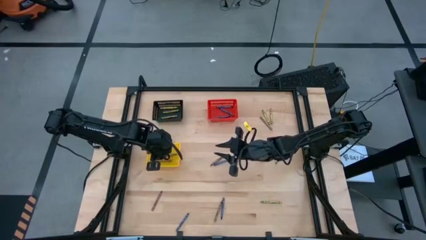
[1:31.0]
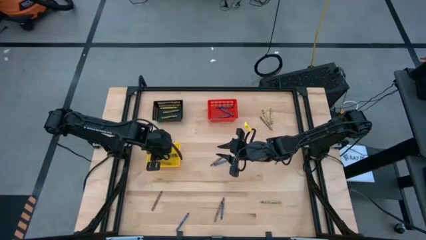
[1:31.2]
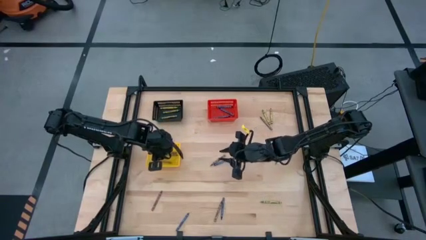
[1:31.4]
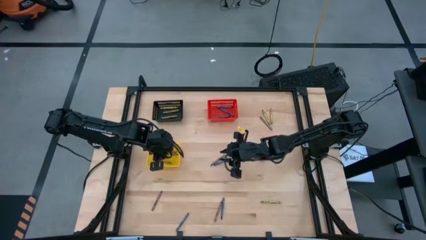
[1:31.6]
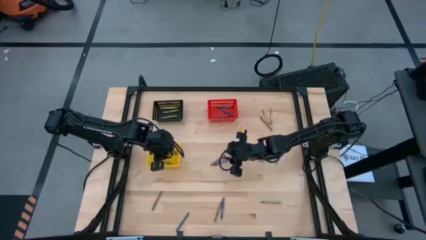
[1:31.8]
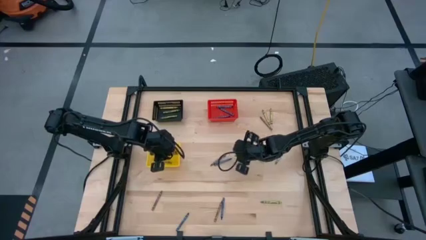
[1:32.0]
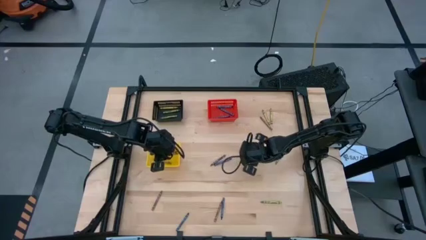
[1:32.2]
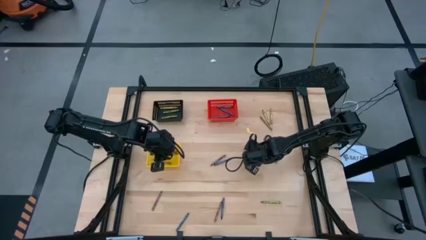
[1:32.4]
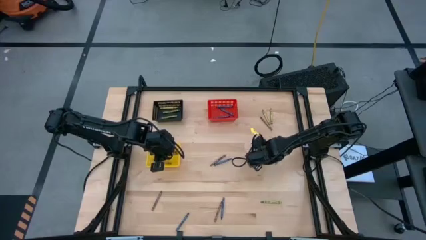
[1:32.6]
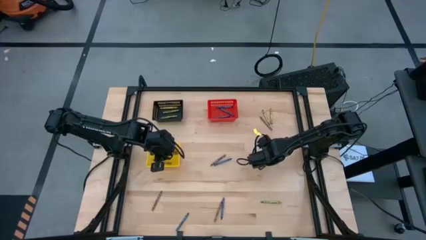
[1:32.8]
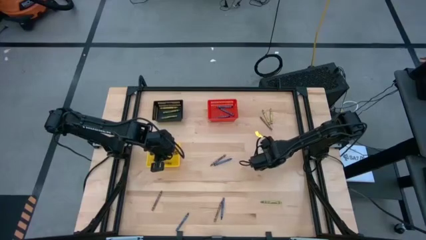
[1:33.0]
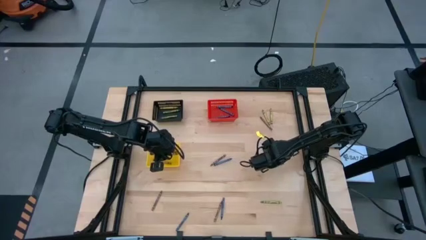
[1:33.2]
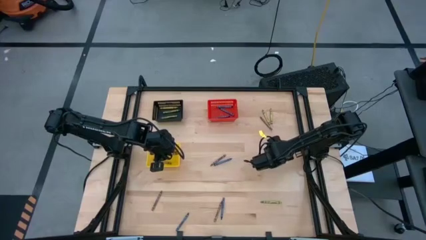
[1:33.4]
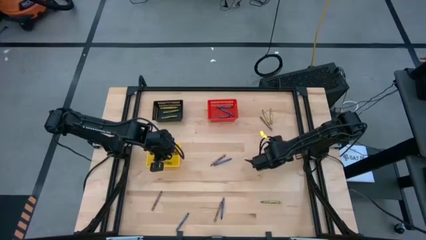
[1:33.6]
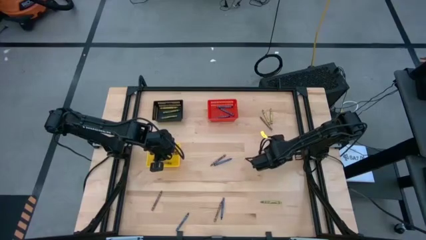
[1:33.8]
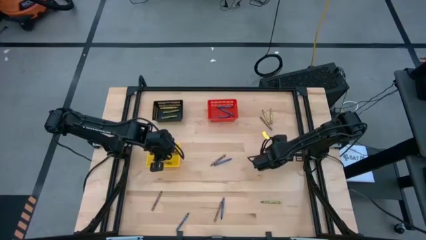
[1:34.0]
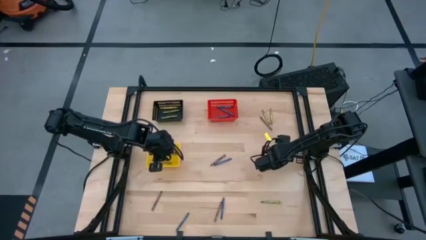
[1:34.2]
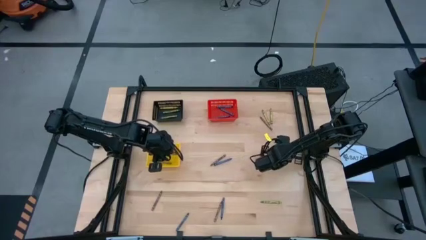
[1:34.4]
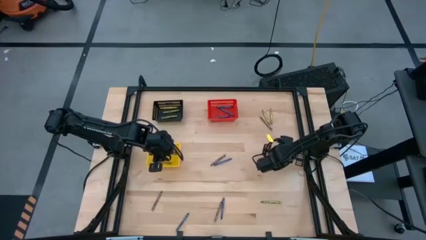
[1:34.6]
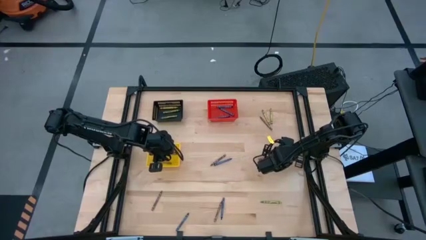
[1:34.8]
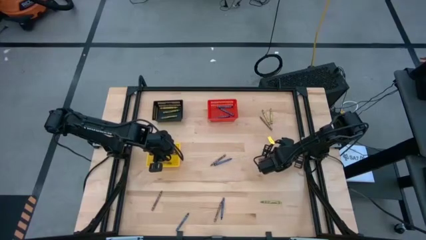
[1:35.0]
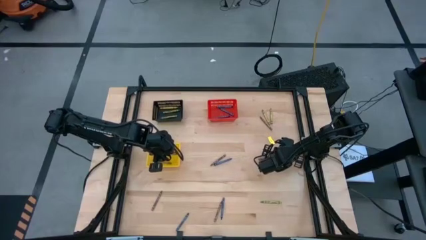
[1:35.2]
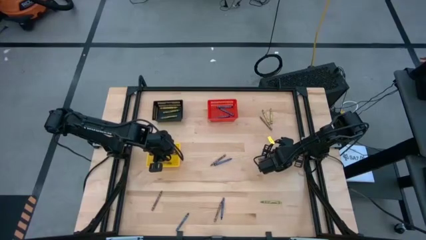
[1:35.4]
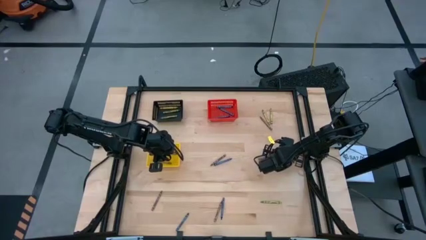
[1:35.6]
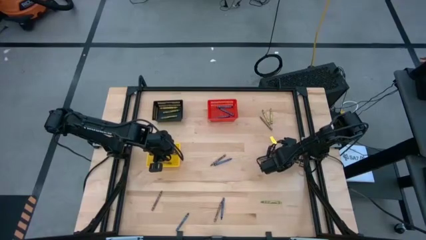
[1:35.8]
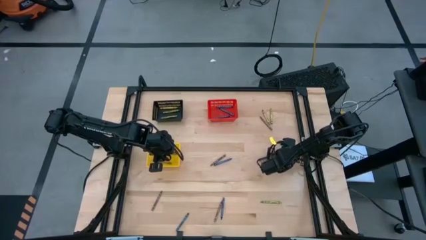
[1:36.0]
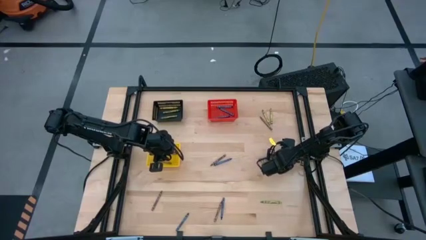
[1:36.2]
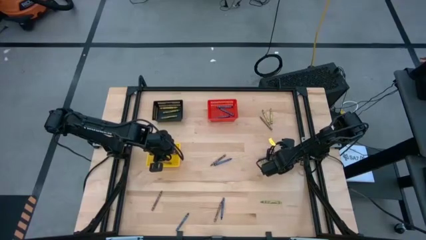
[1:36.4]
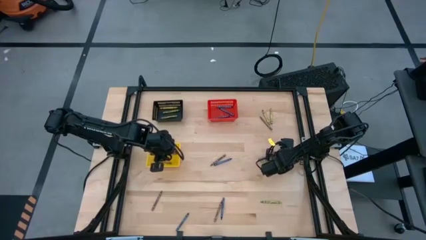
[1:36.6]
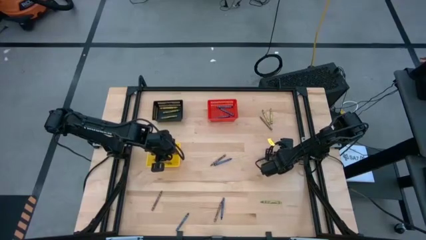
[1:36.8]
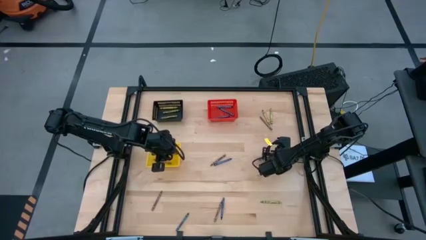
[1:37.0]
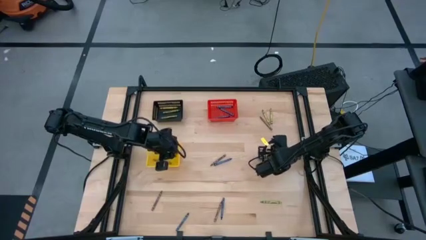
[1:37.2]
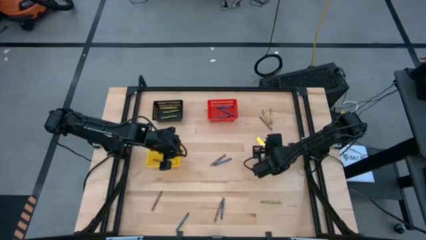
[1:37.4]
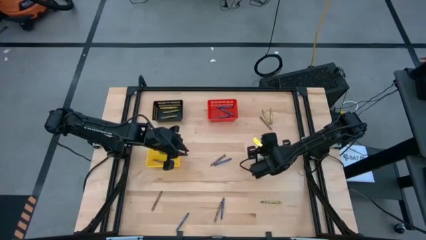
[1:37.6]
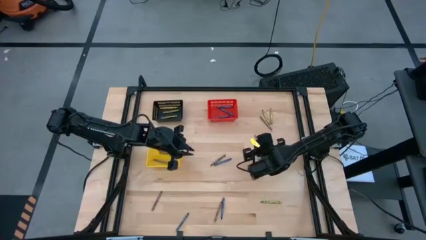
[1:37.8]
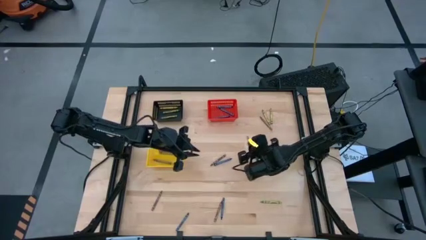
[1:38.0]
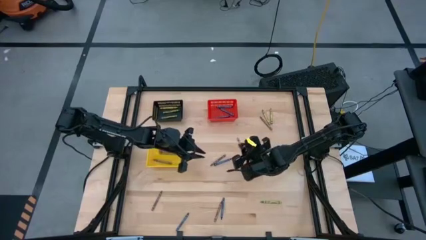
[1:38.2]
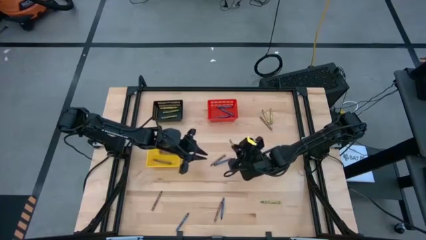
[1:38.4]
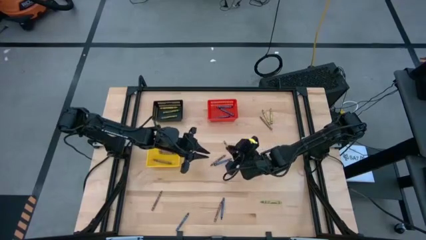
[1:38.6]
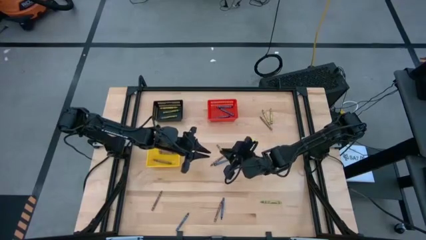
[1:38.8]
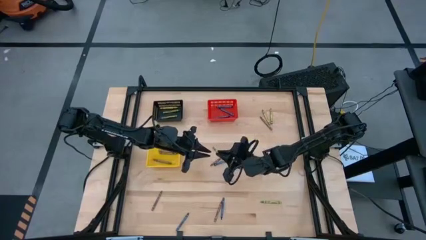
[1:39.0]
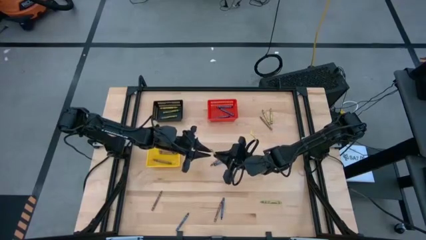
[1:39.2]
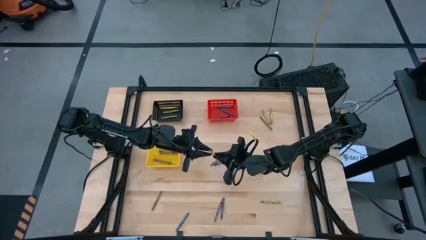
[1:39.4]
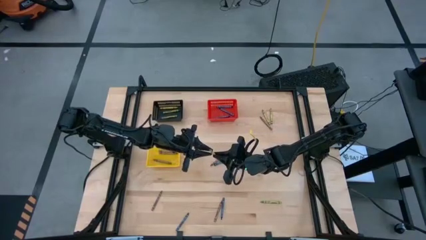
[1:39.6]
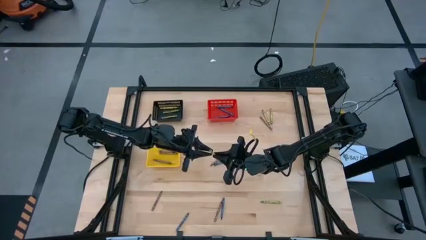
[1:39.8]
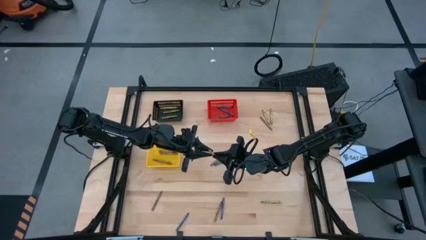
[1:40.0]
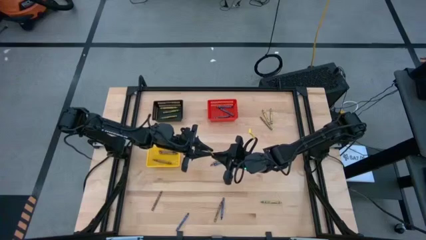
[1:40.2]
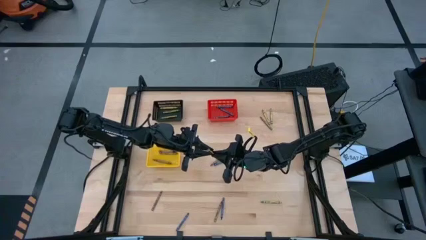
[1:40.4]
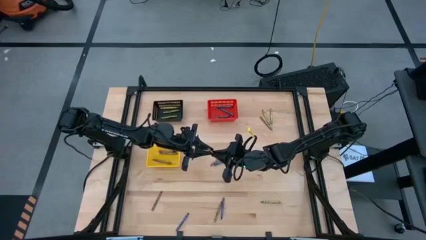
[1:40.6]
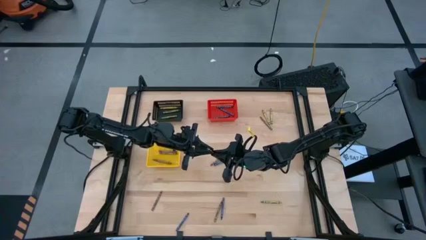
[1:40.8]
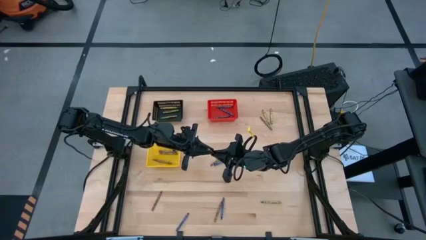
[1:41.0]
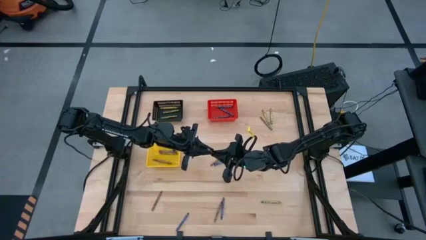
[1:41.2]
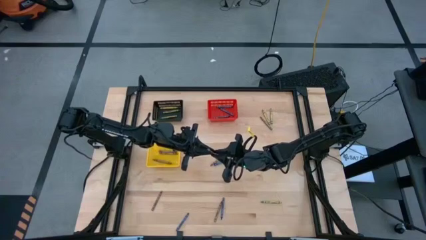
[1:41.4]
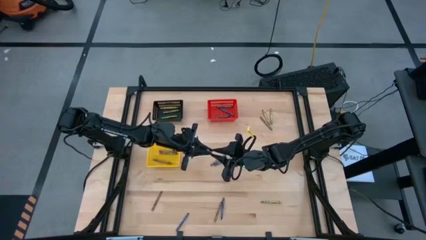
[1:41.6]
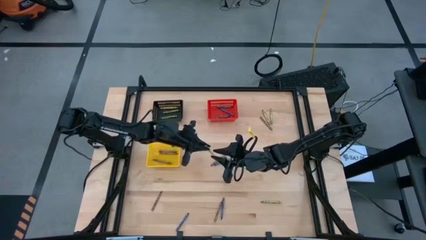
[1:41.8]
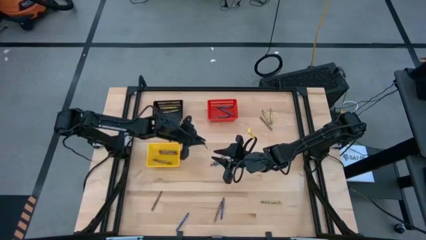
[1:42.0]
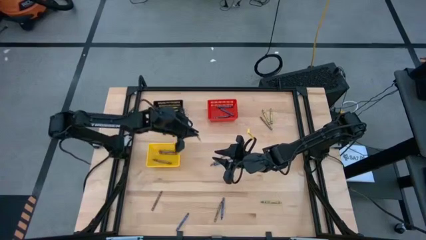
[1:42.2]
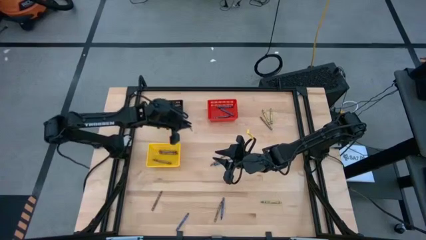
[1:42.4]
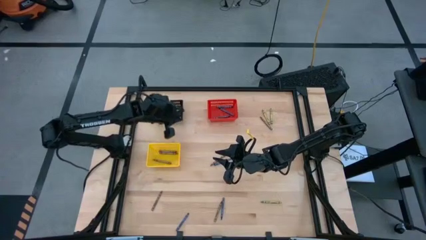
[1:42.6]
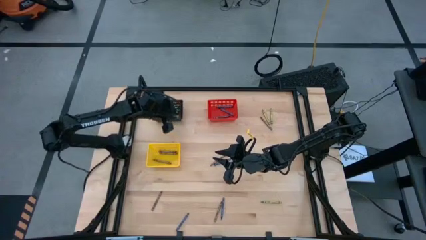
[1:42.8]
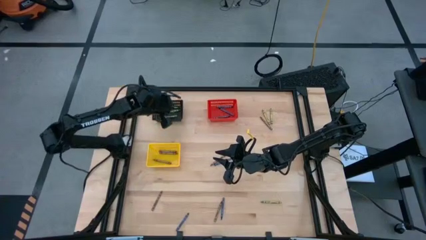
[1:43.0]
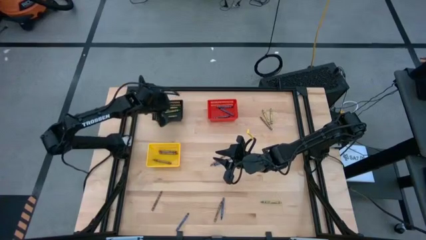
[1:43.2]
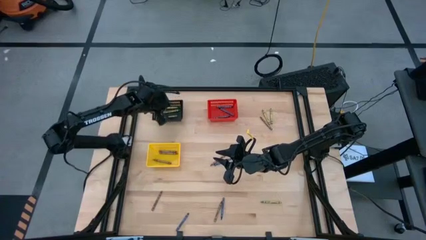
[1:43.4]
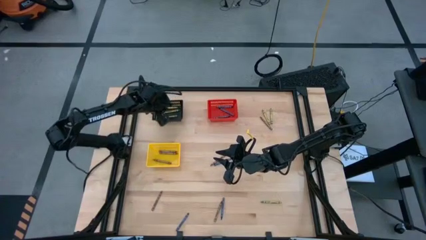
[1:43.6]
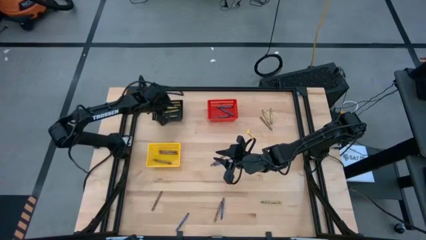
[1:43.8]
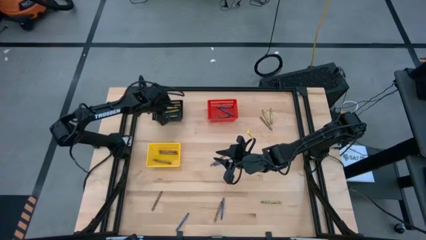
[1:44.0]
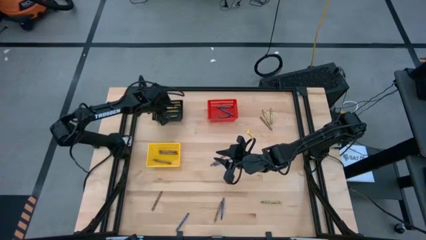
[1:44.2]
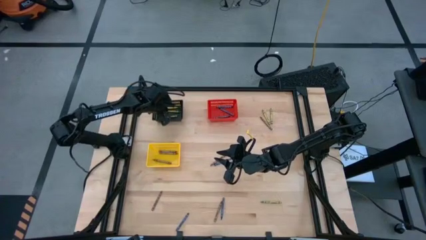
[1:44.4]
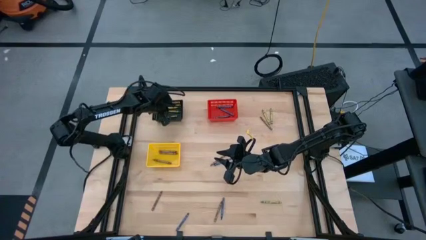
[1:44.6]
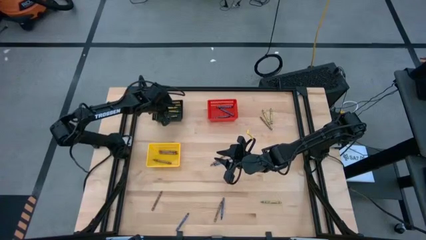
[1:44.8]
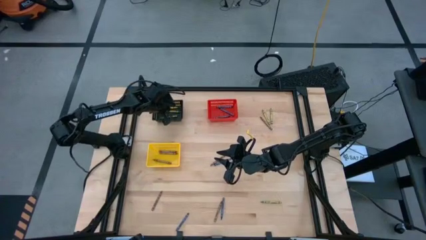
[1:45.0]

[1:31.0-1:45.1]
Task: Sort crayons
Put the green crayon into the black basket
